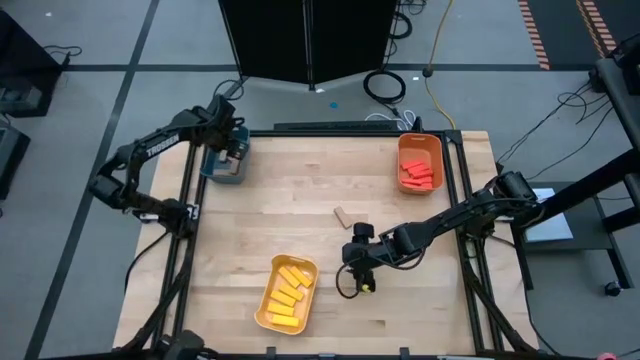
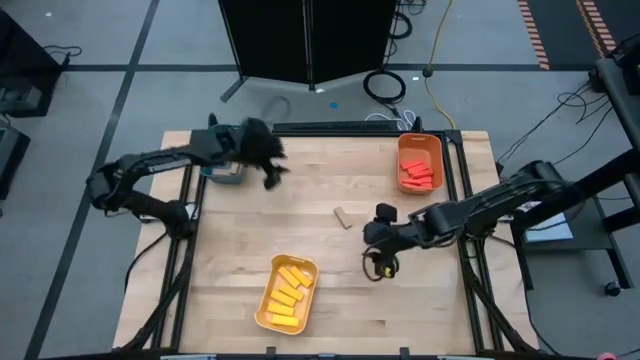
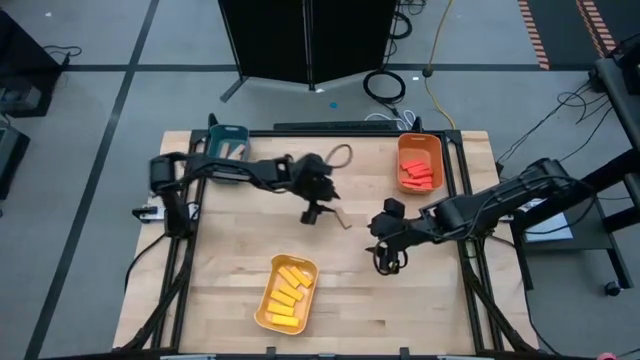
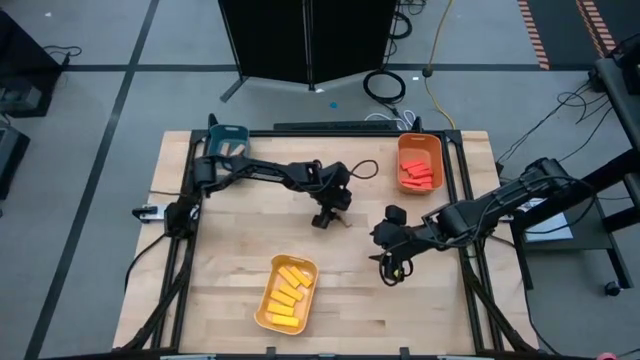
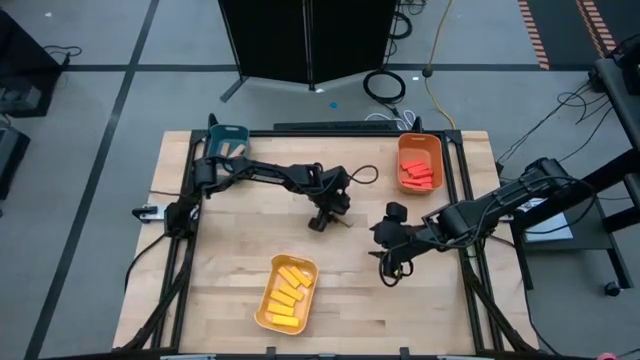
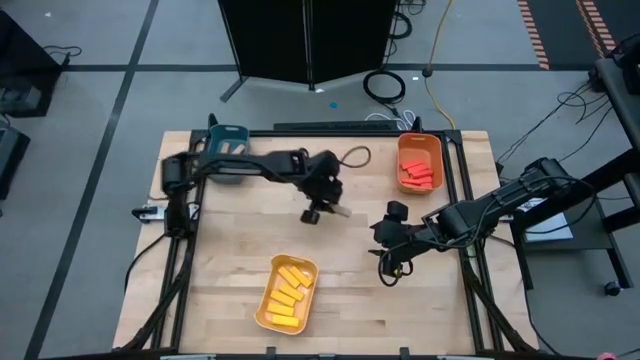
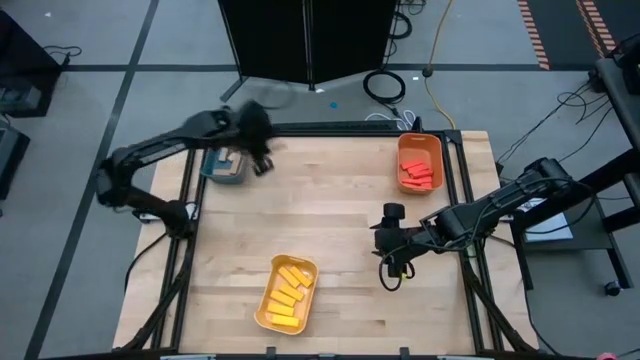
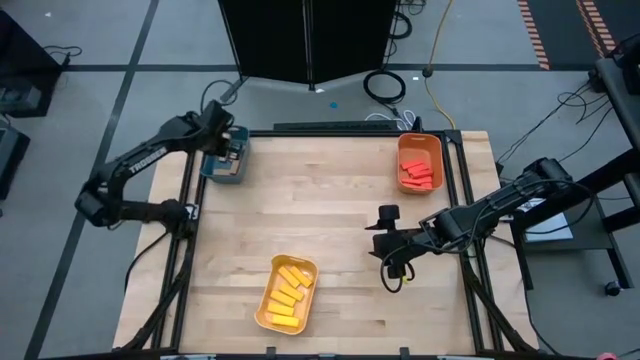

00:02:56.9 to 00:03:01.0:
Task: Sort blocks
Put the brown block into the blue bin

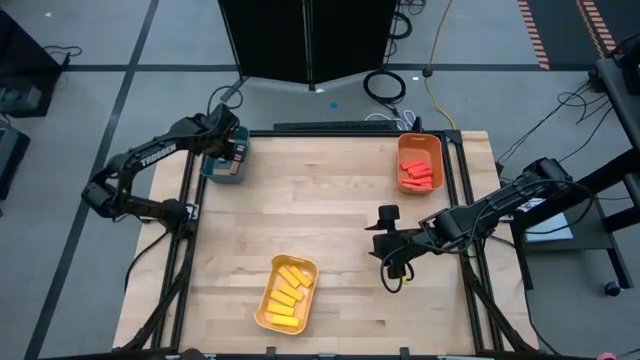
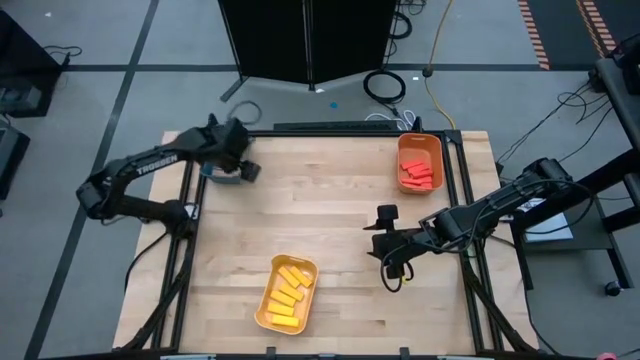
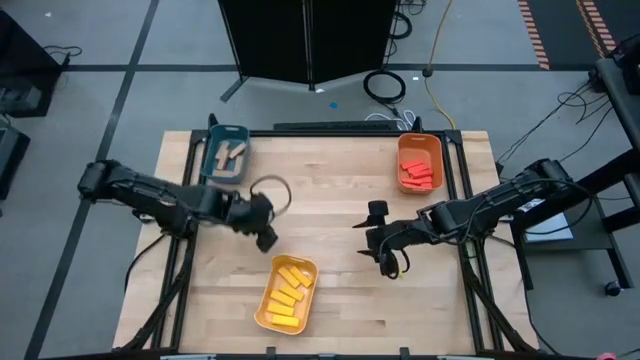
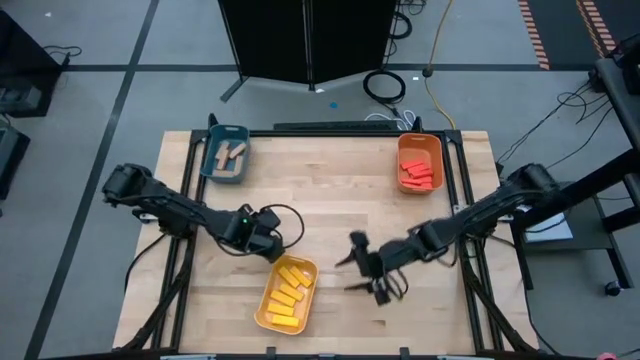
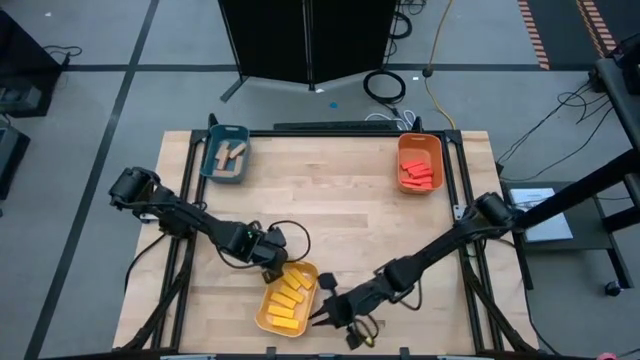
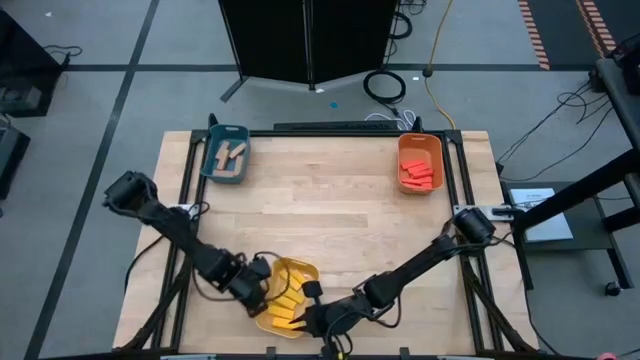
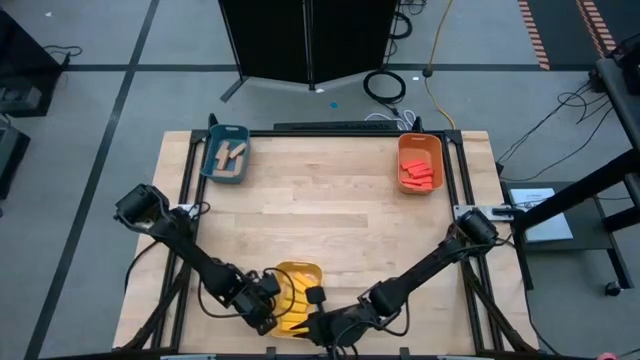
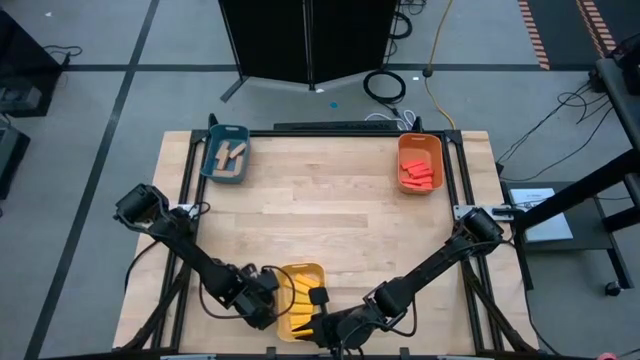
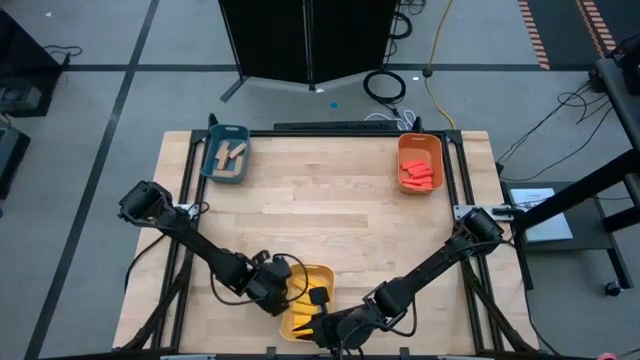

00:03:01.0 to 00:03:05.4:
Adjust the yellow bin on the table

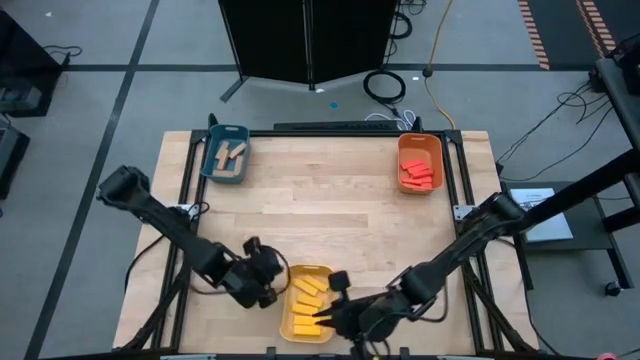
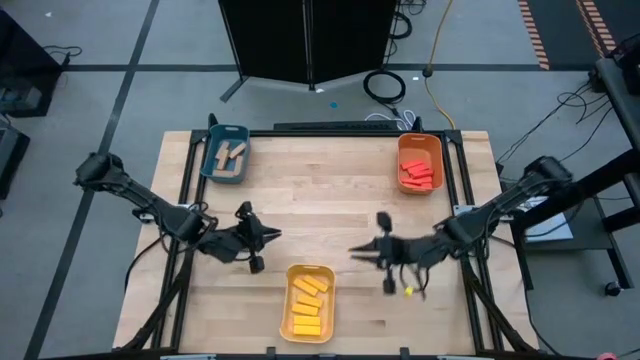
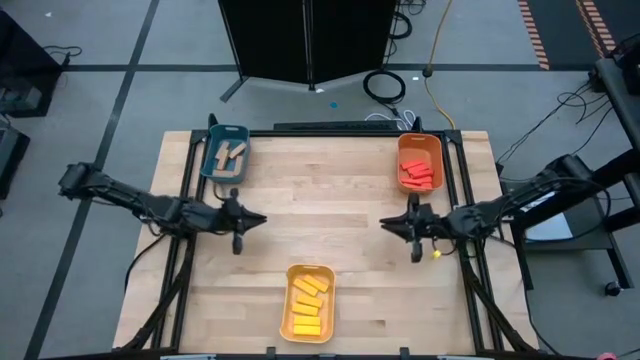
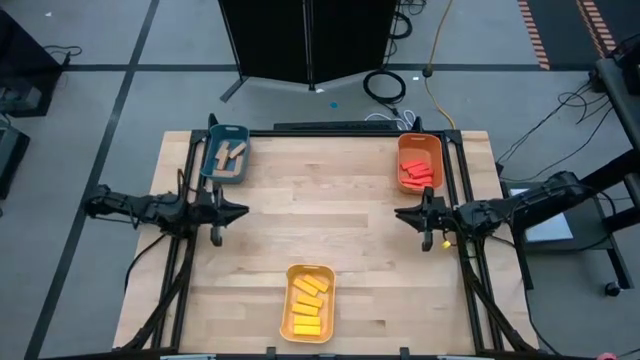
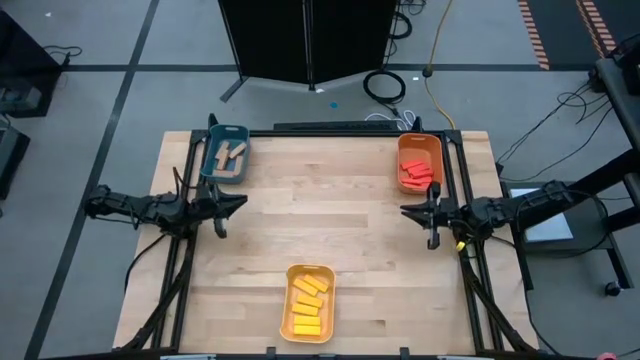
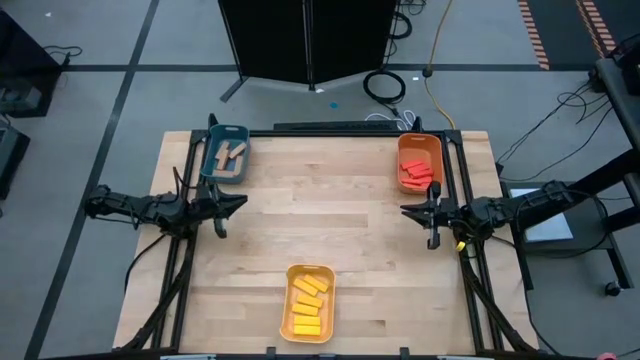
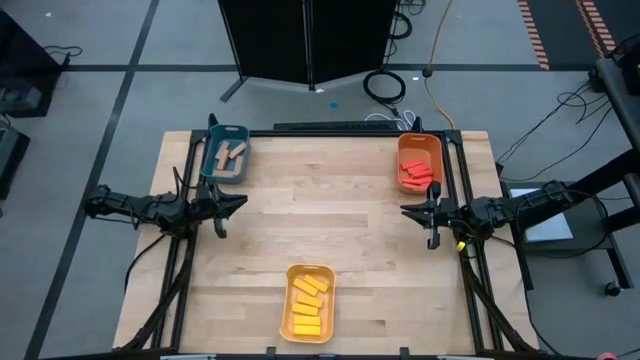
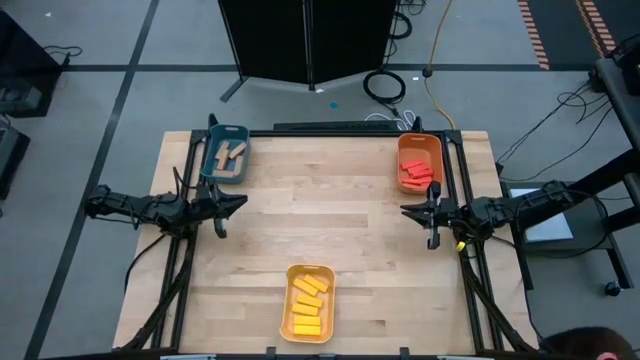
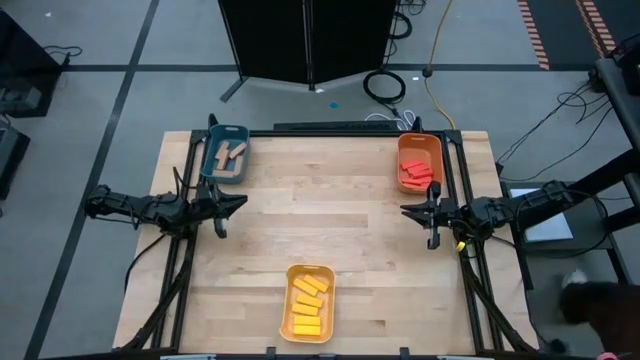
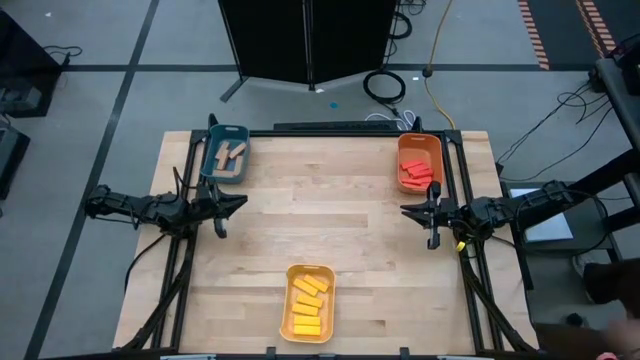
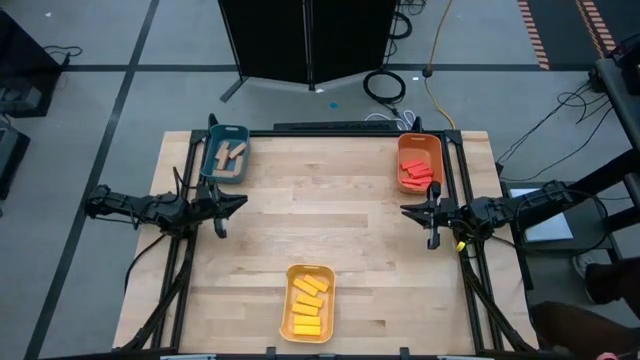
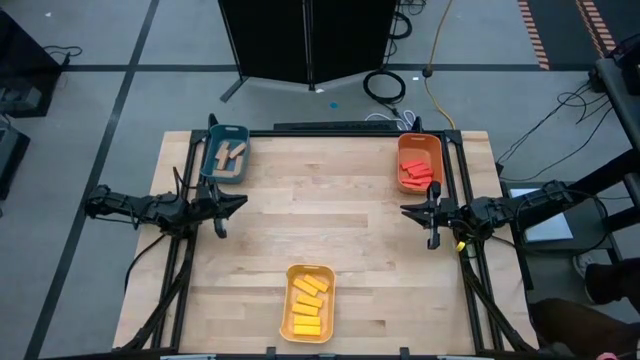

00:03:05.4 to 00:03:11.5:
Return to Home Position

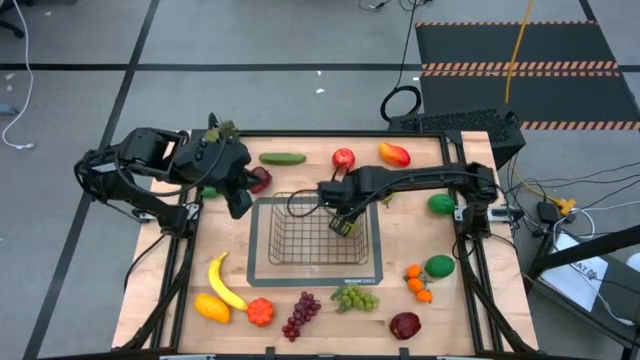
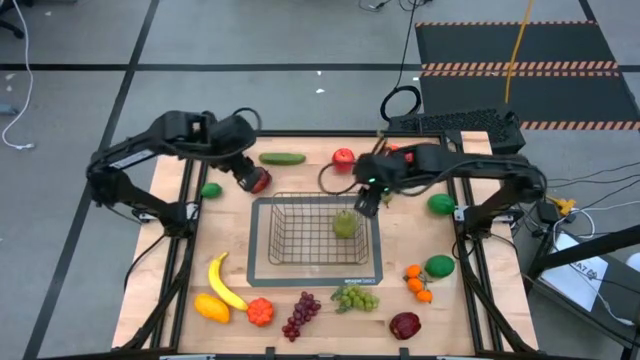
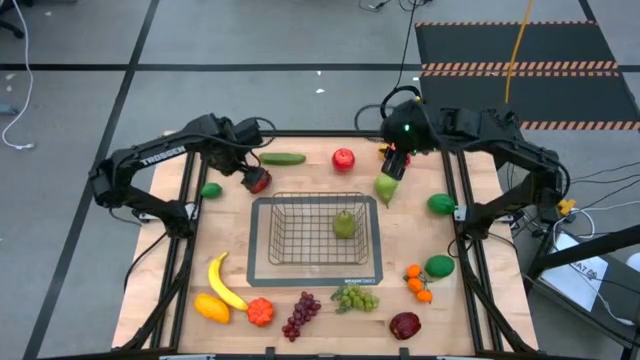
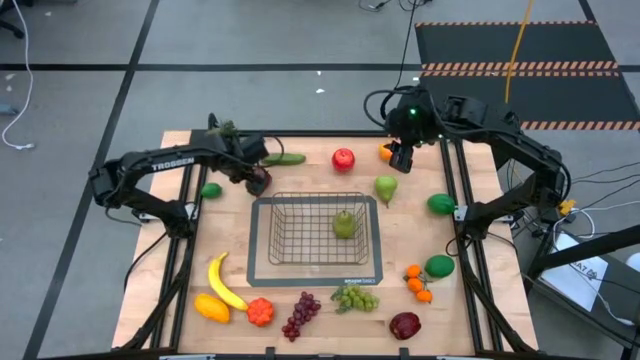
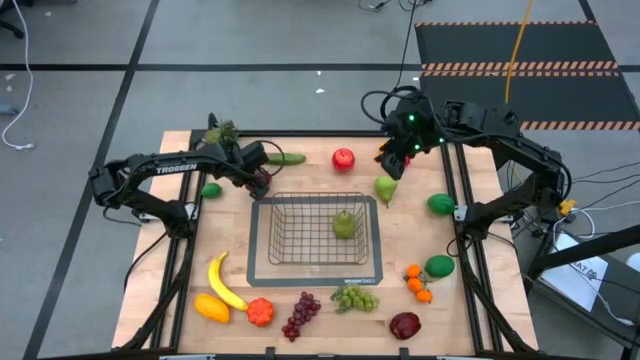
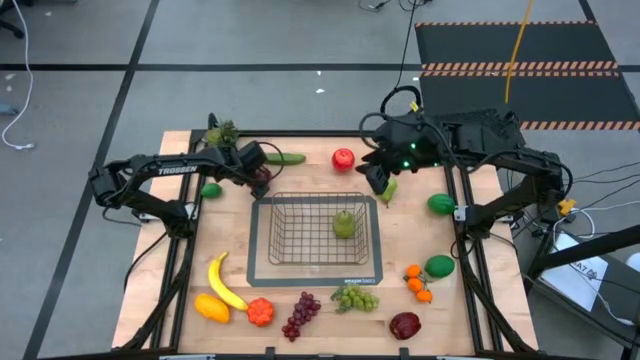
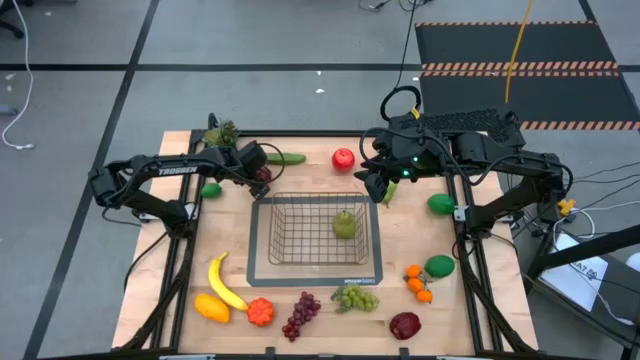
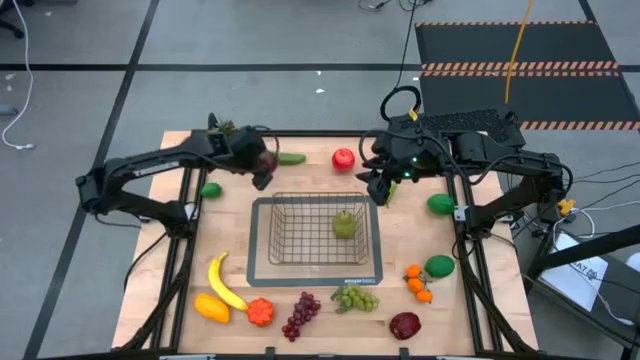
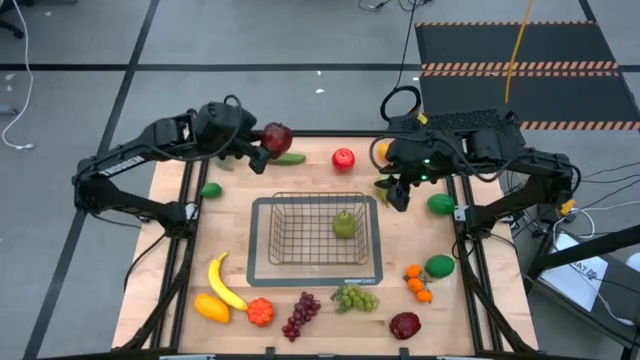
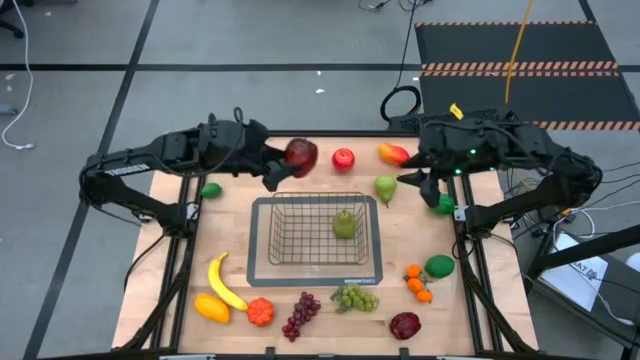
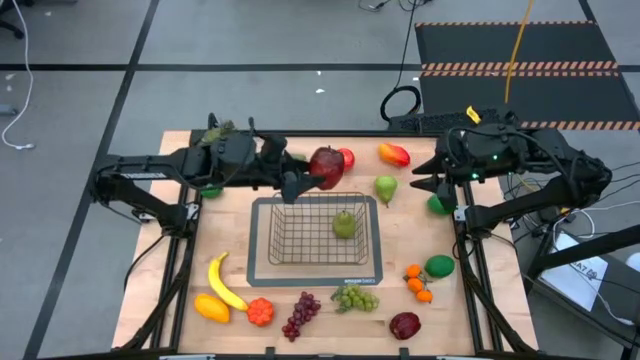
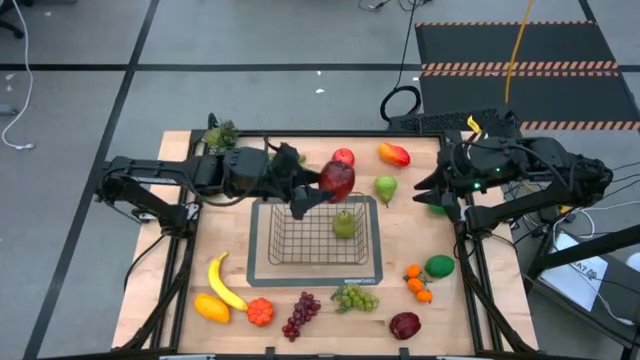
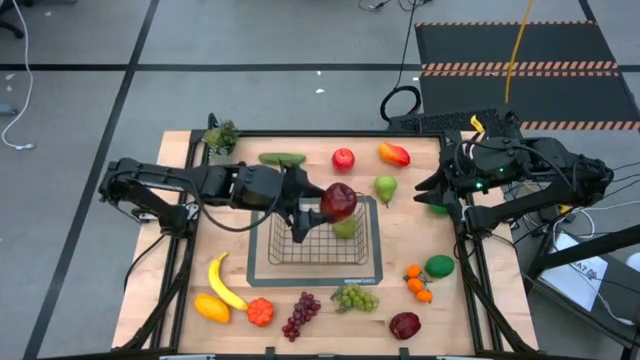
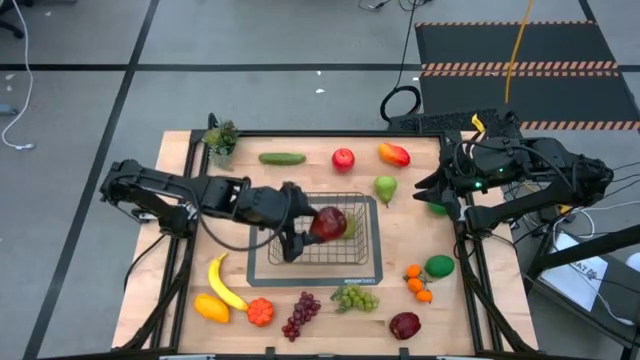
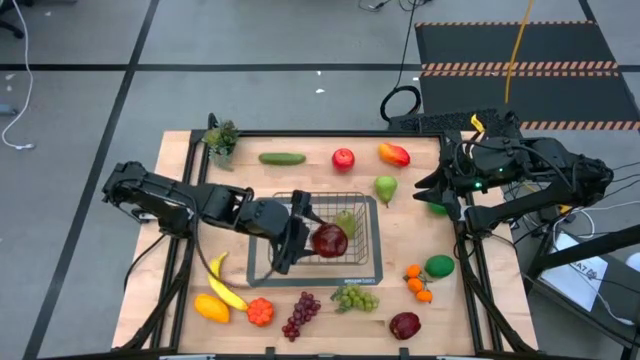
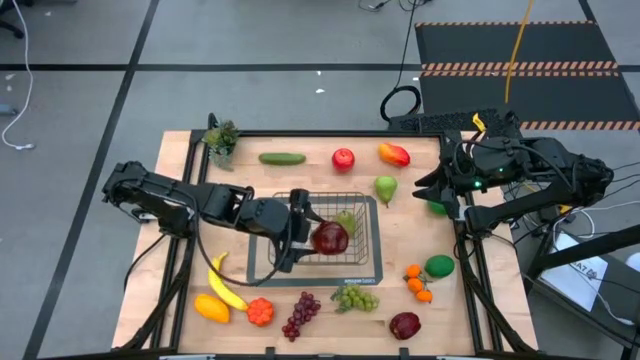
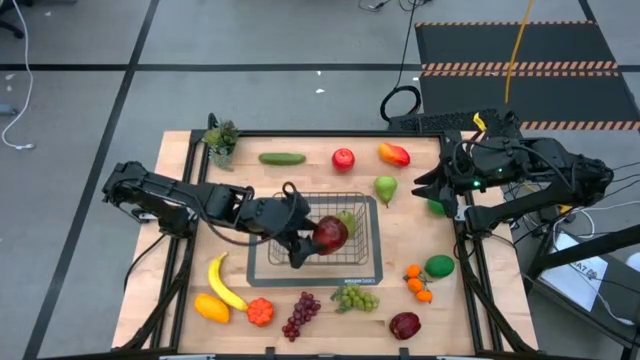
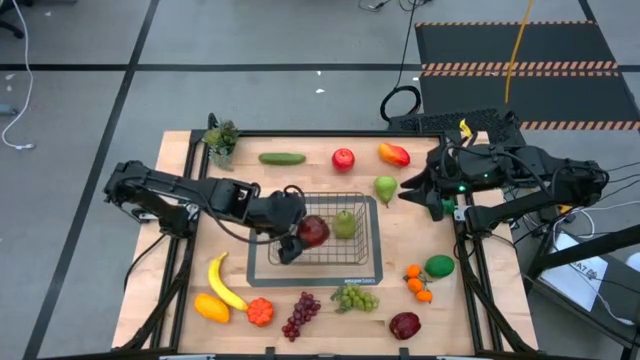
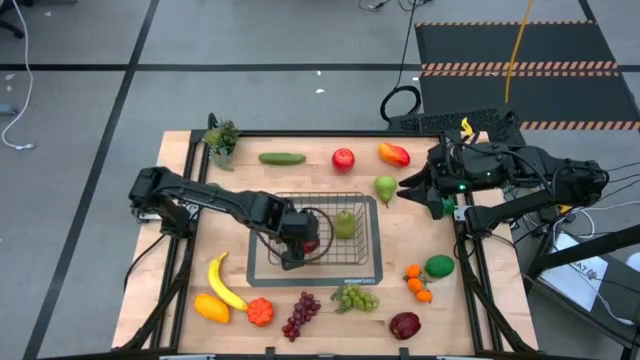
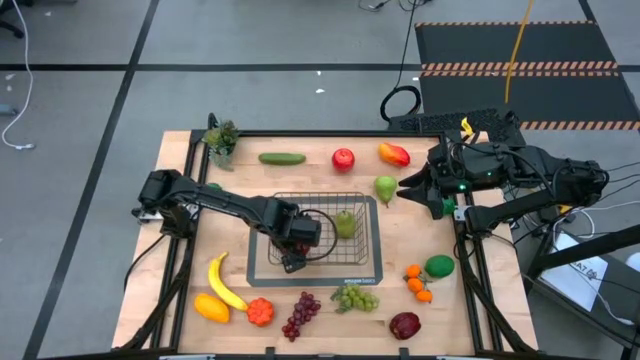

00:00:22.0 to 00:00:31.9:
Task: Build produce basket
Put the top dark red apple into the gold wire basket
